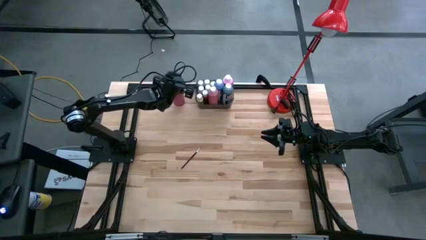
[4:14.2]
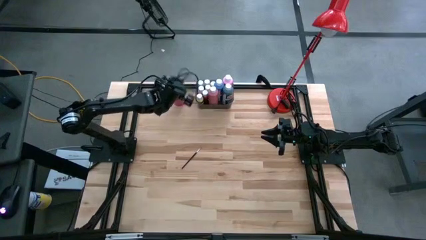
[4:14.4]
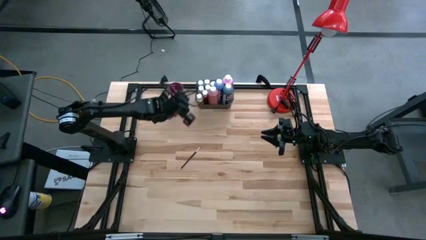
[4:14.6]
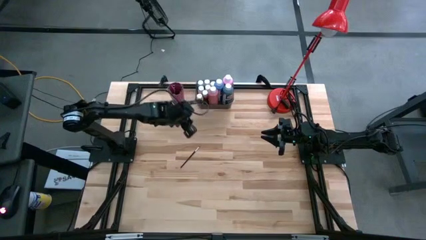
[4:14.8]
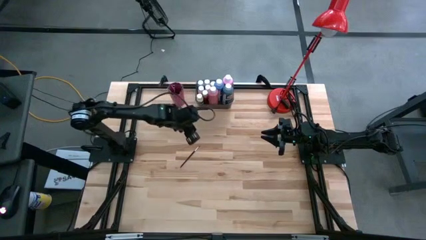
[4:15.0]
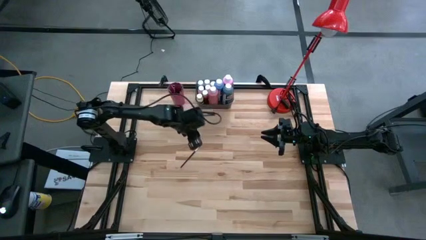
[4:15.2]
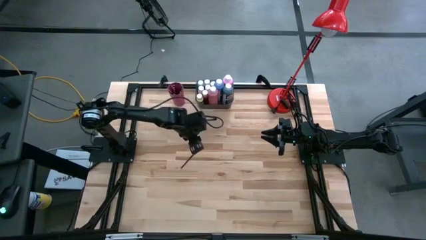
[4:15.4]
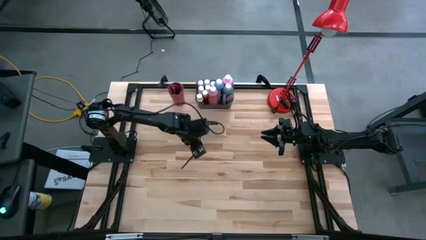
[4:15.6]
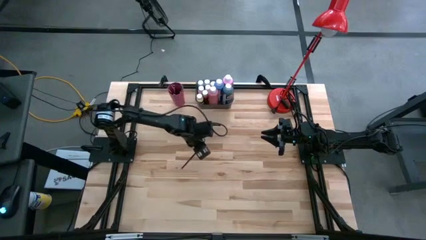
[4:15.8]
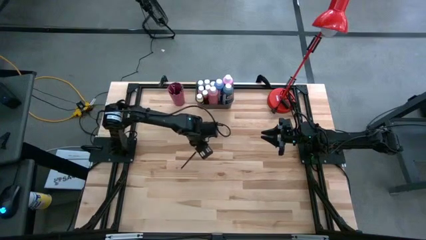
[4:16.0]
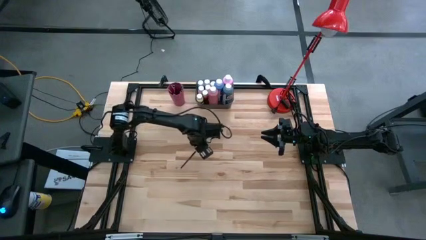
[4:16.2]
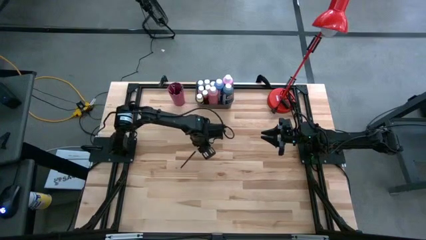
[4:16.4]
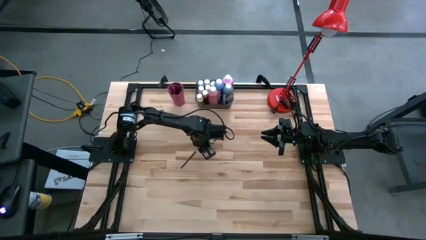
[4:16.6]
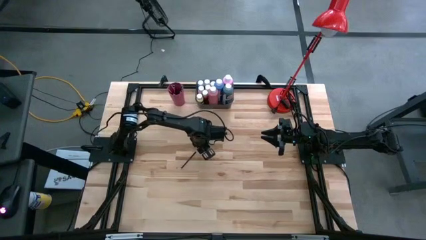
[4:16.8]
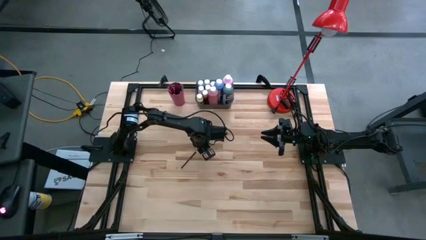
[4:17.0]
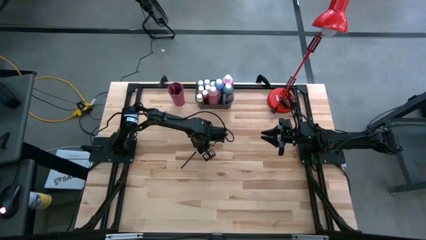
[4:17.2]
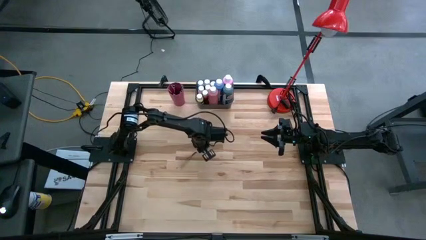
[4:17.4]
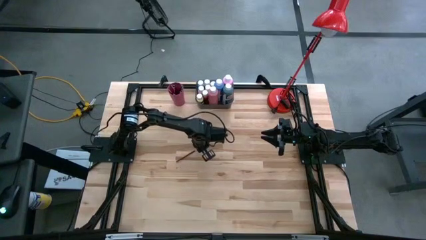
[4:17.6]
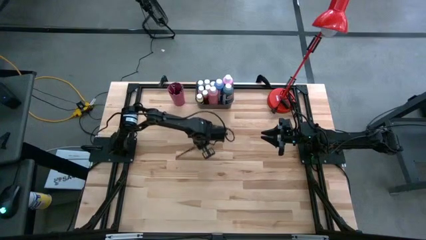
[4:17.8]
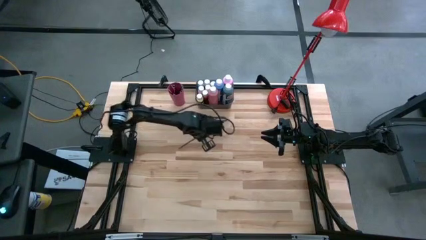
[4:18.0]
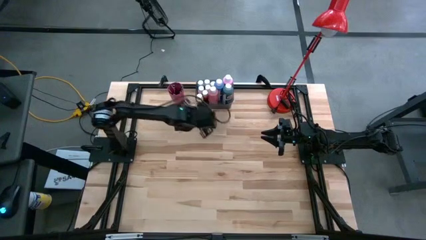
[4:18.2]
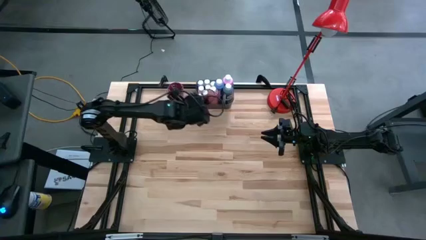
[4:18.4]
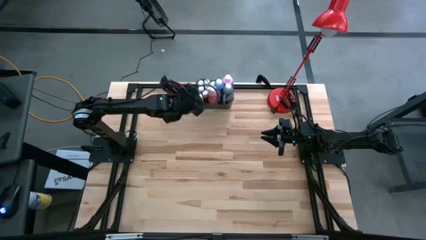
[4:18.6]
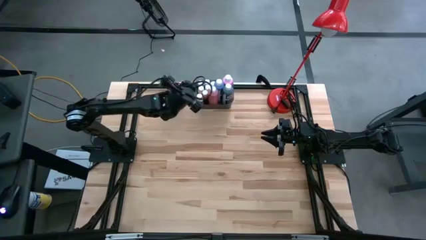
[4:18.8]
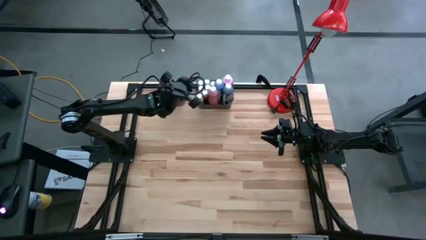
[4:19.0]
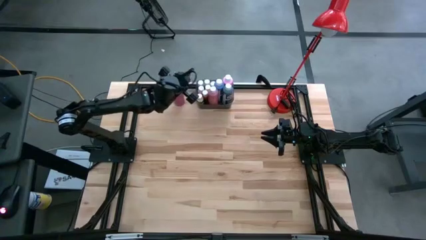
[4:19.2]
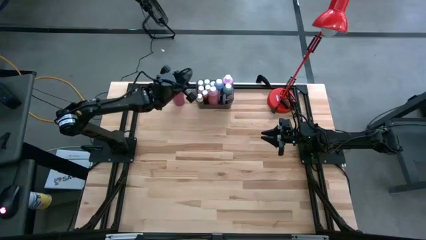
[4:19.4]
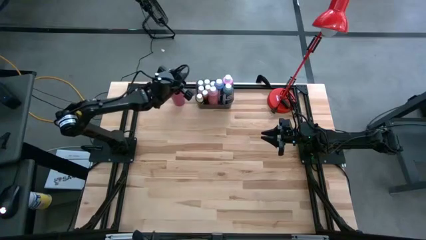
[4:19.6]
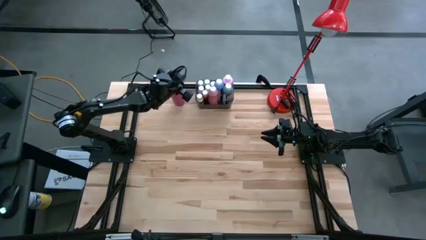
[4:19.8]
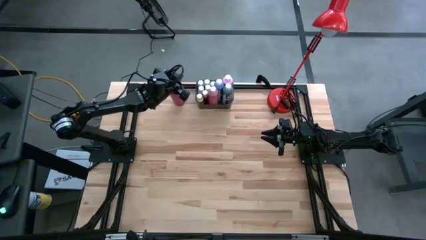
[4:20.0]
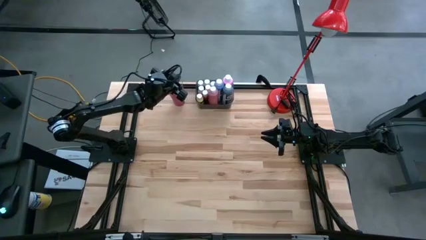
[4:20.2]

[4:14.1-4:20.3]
Task: Pick & Place Paint Supplies
Put the black paint brush into the pink cup

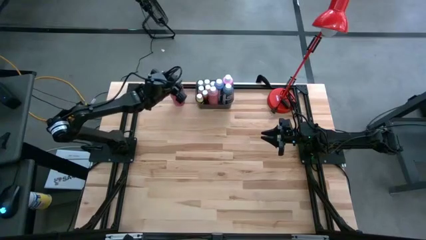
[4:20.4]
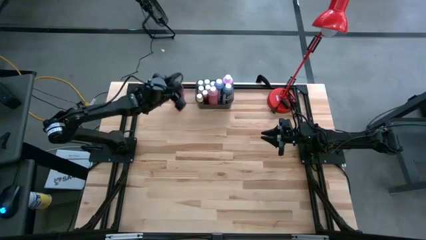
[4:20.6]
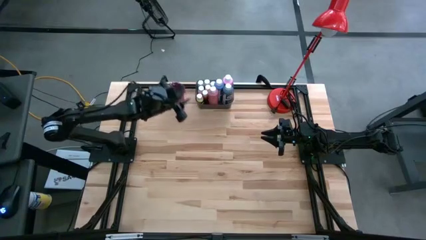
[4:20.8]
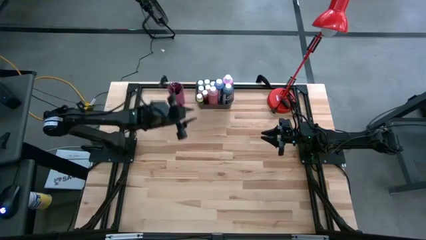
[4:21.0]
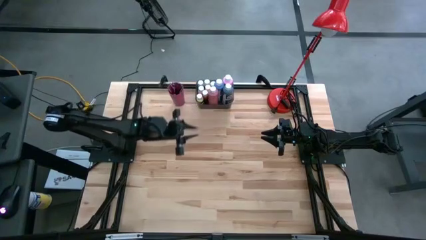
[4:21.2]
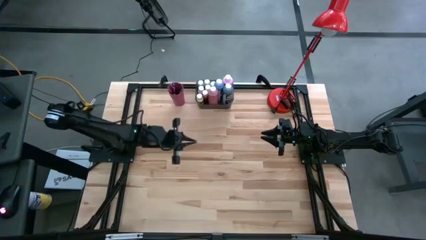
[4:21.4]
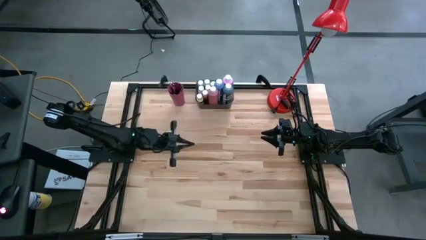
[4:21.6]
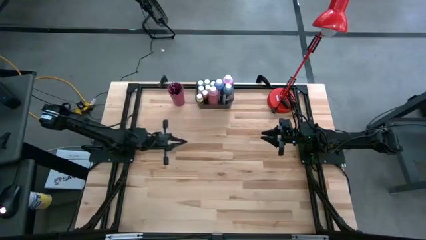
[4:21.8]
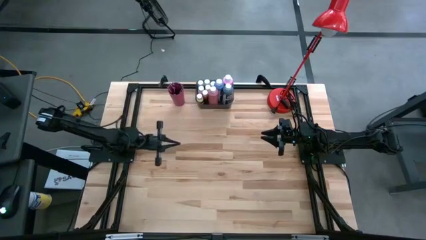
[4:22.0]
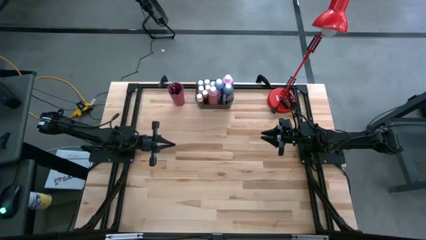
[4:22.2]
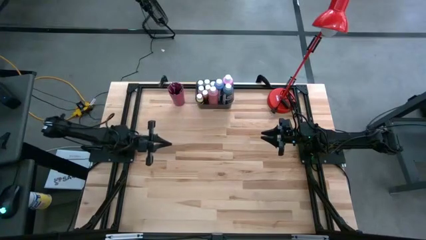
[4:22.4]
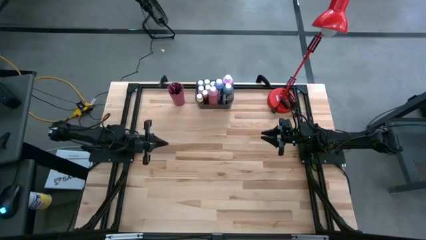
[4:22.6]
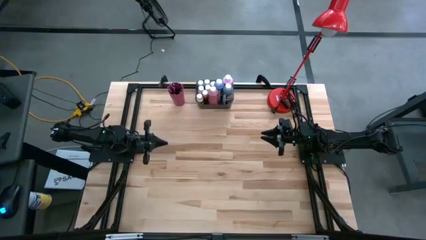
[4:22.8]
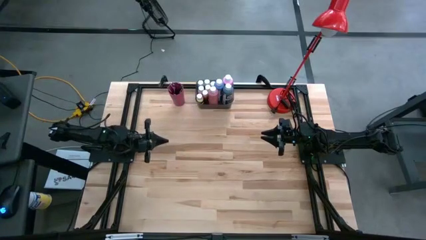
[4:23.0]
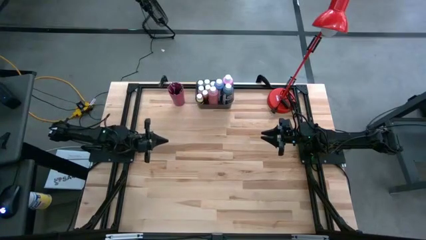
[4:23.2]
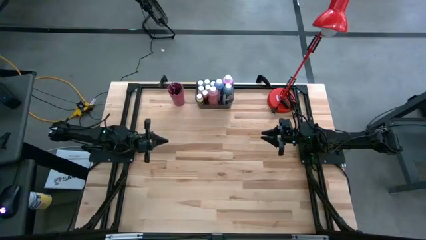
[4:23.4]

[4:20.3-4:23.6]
Return to Home Position

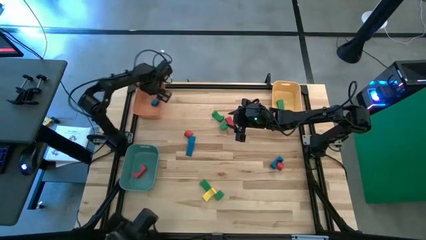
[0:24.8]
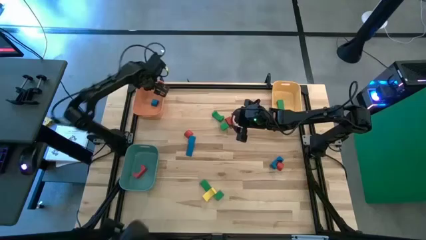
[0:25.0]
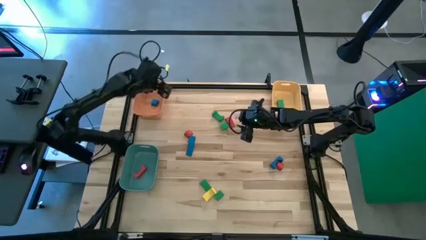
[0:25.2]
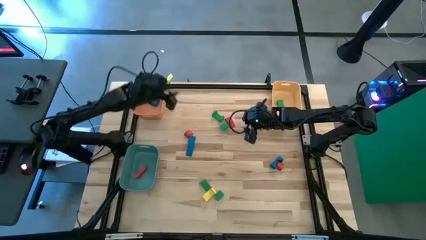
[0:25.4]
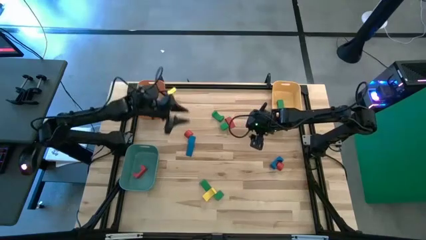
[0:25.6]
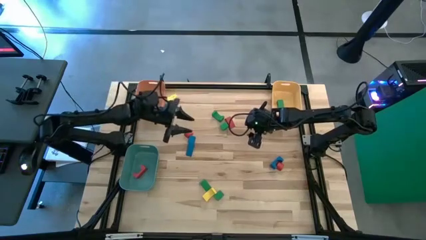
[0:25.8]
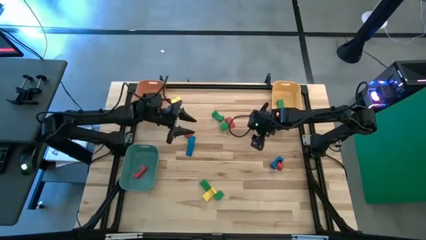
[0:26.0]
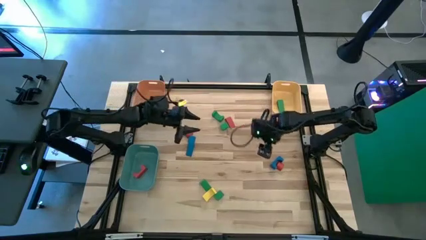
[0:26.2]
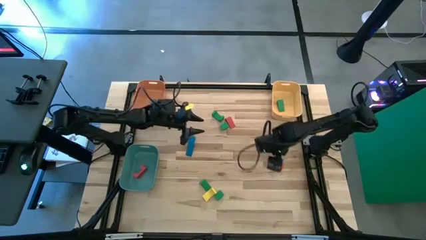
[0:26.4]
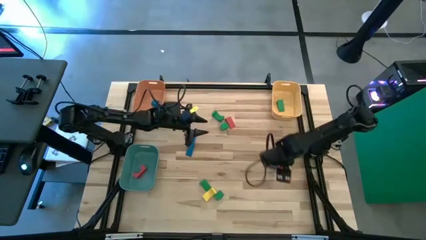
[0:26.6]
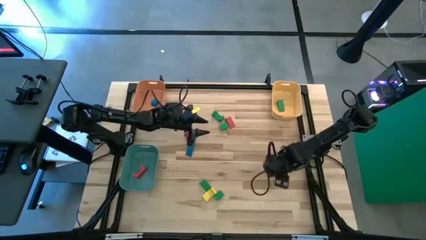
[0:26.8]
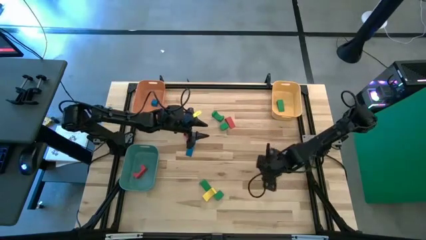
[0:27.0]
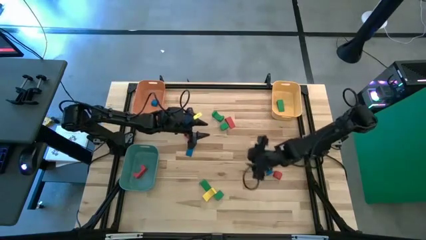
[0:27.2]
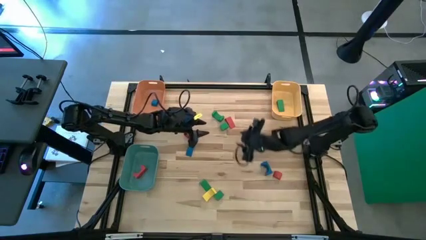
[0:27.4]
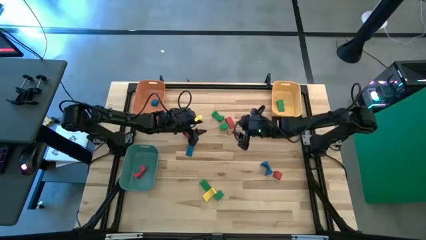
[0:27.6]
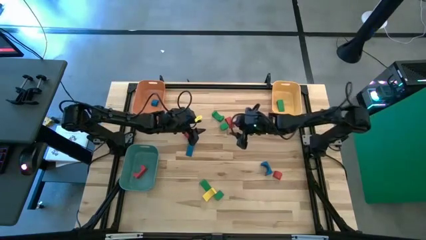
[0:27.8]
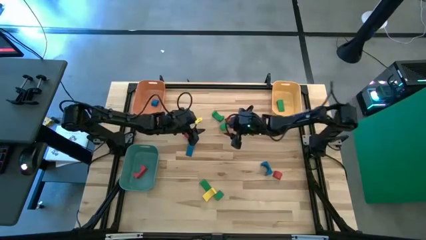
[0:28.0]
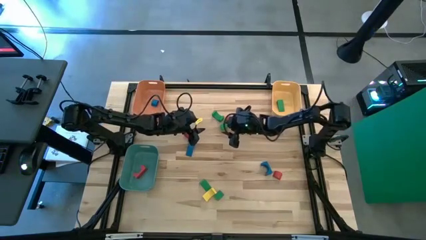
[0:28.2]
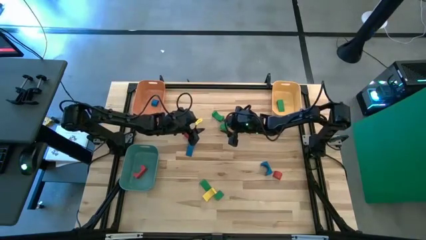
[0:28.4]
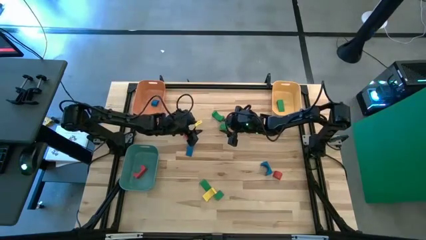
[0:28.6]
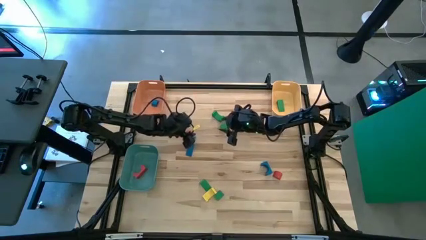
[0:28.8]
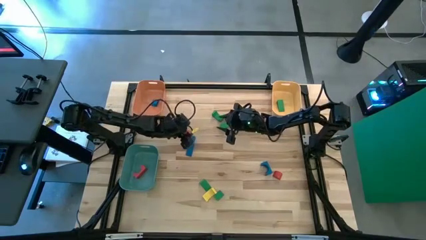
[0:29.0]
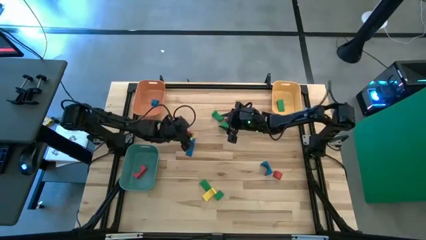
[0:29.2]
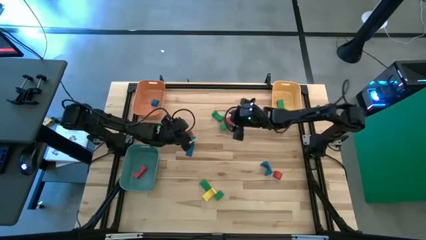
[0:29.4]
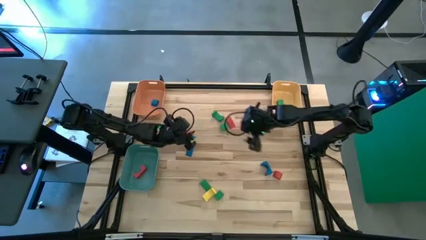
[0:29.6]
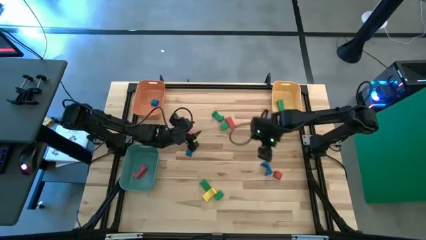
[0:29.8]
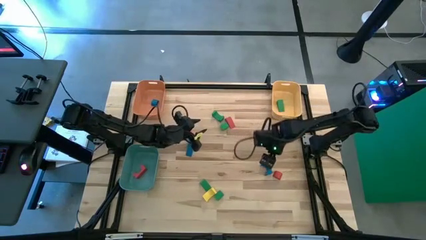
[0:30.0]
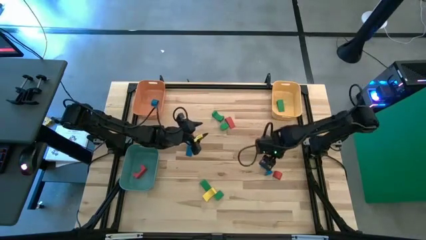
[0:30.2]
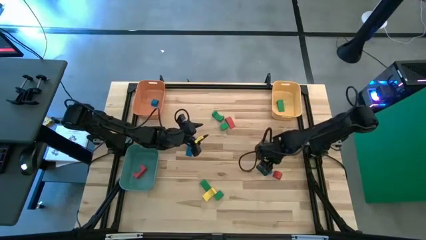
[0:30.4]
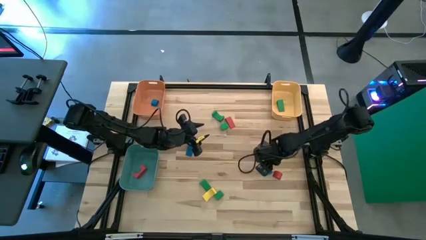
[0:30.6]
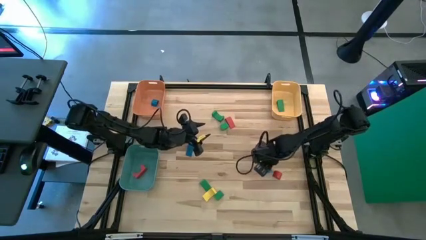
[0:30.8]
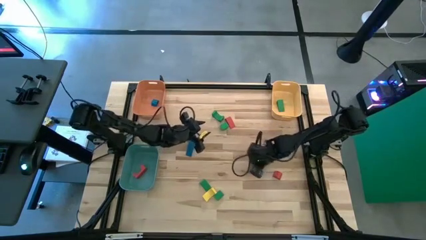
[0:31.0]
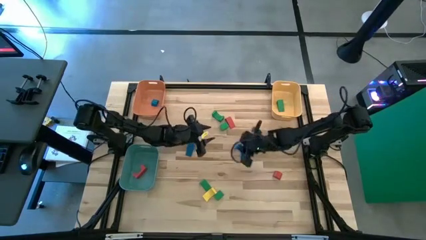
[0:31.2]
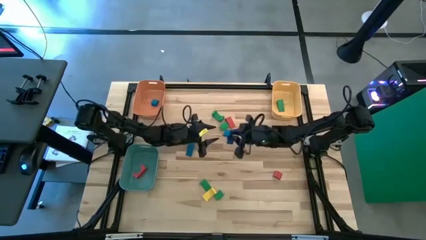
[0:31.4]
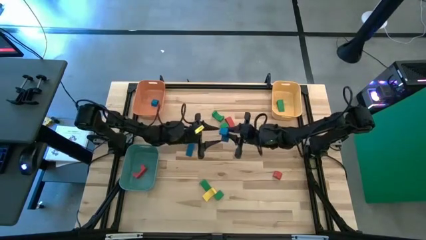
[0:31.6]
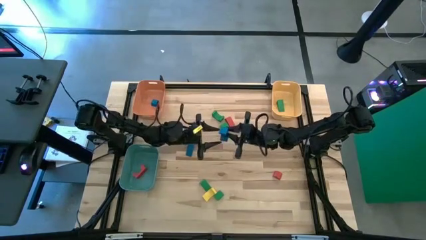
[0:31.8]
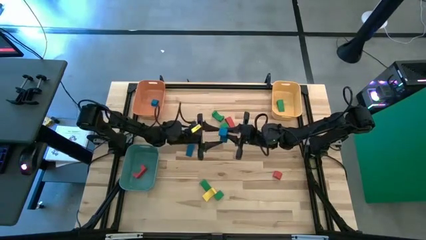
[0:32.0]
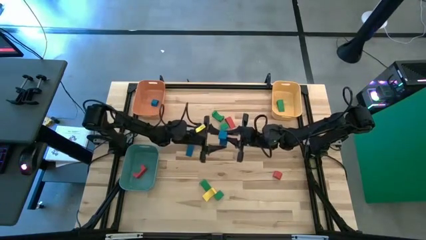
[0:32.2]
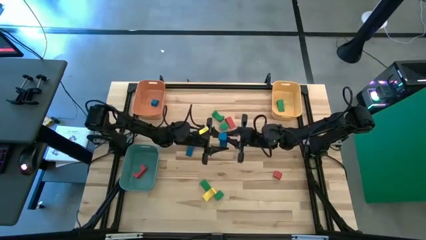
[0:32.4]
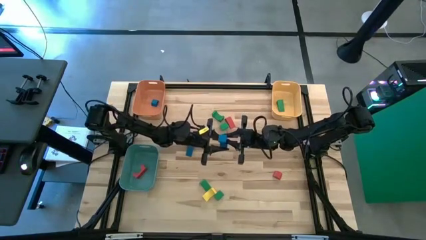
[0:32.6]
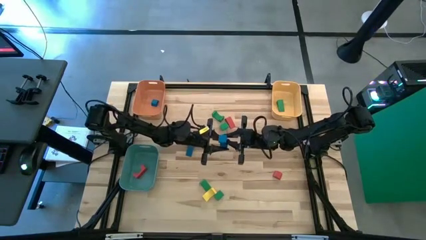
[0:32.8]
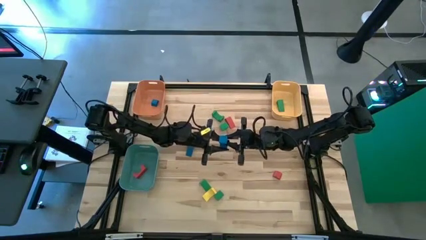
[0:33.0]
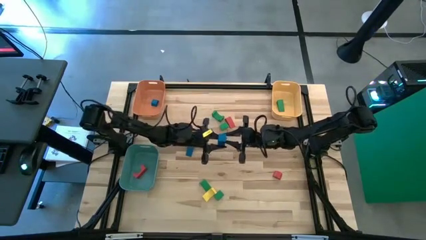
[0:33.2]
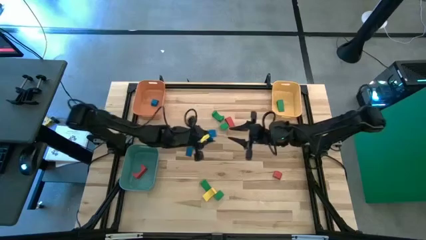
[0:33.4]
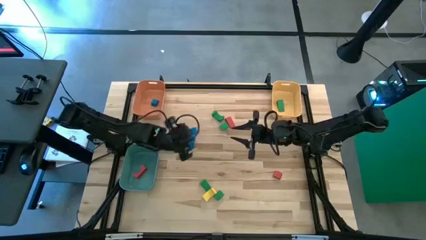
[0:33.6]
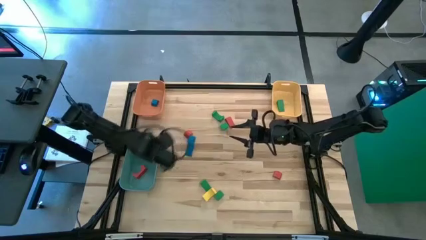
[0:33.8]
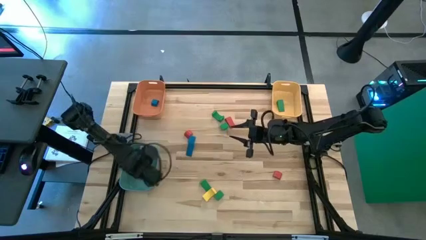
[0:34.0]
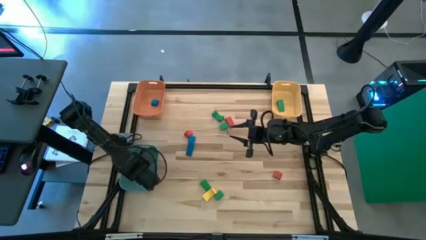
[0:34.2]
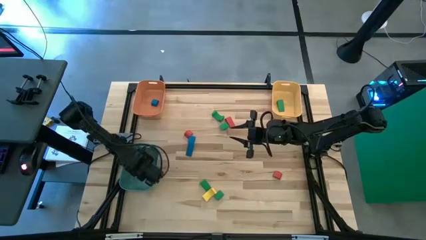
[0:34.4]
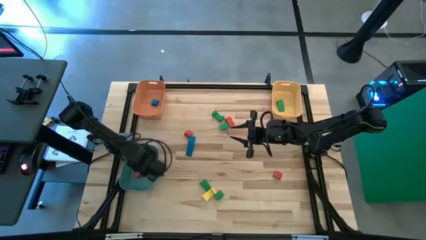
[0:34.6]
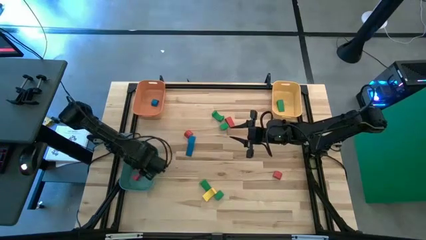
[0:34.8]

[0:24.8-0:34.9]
Task: Sort blocks by size
Put the blue arch block into the blue bin
